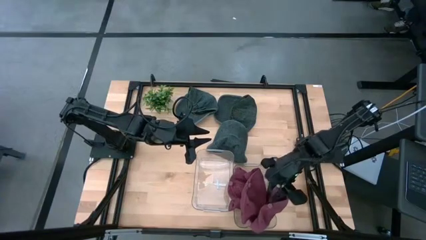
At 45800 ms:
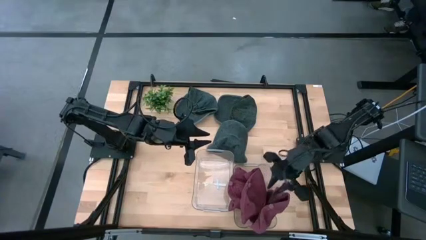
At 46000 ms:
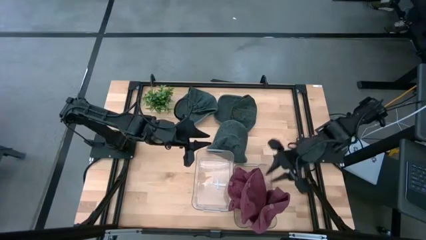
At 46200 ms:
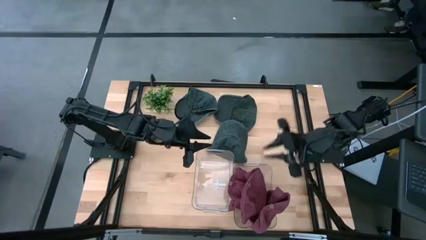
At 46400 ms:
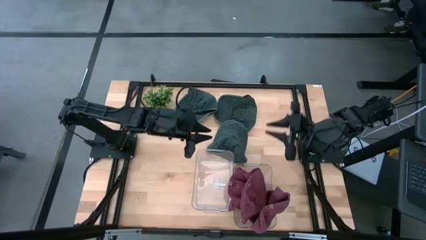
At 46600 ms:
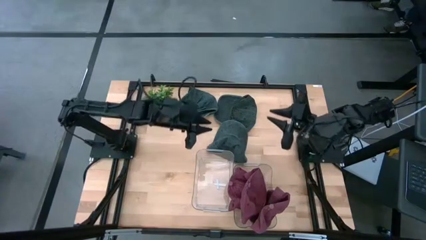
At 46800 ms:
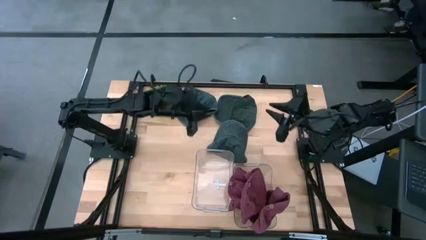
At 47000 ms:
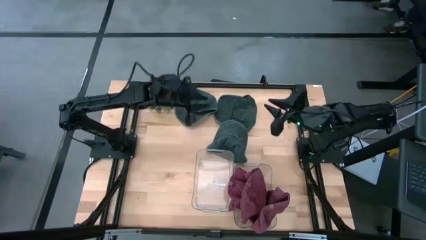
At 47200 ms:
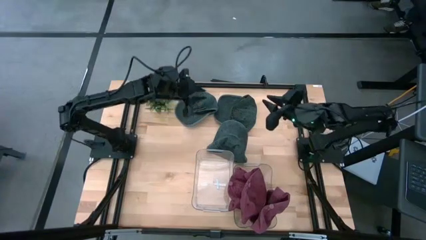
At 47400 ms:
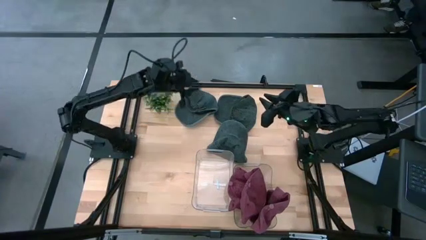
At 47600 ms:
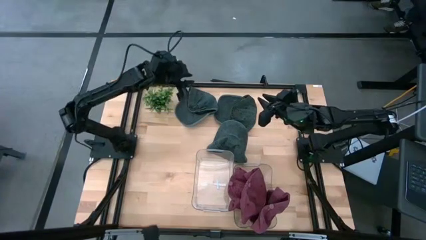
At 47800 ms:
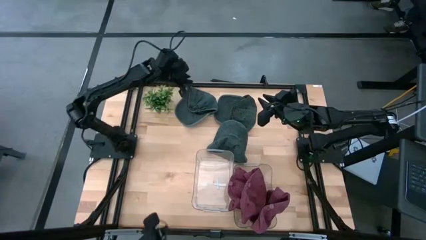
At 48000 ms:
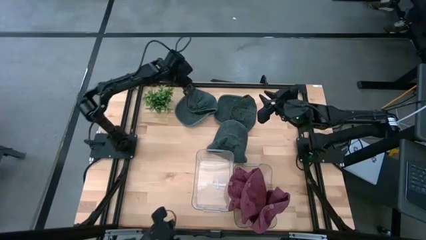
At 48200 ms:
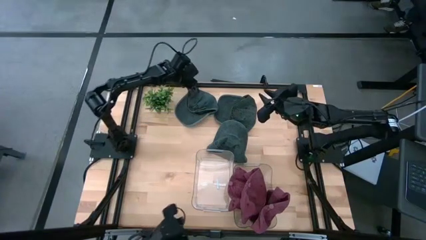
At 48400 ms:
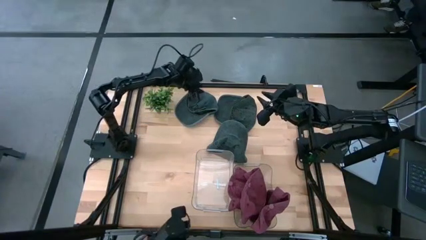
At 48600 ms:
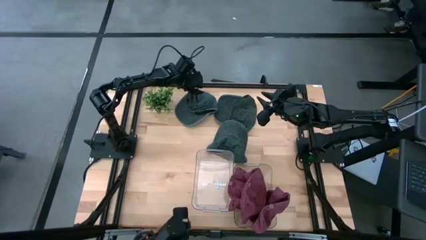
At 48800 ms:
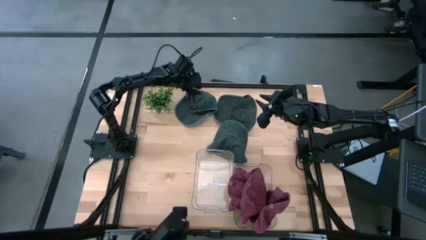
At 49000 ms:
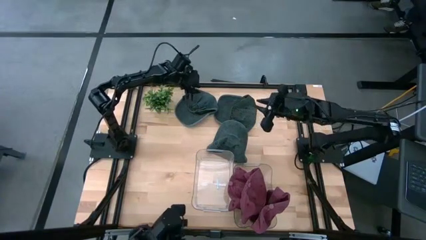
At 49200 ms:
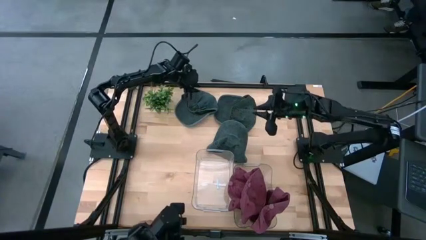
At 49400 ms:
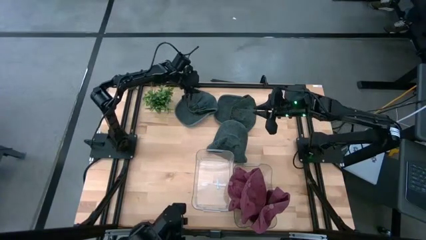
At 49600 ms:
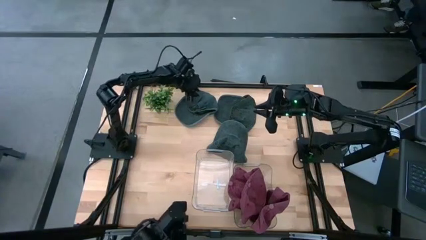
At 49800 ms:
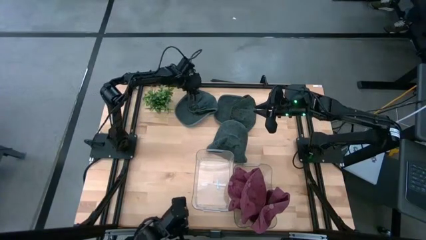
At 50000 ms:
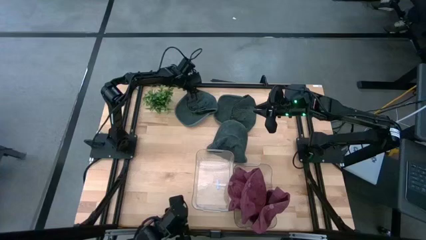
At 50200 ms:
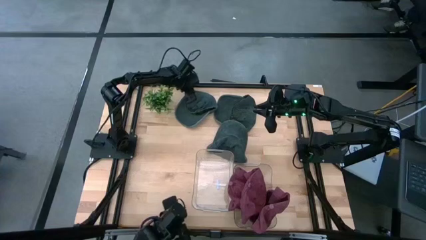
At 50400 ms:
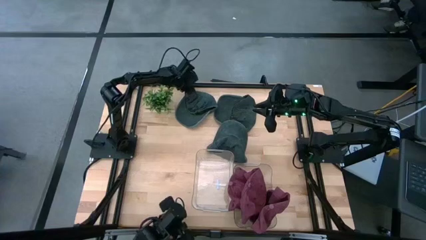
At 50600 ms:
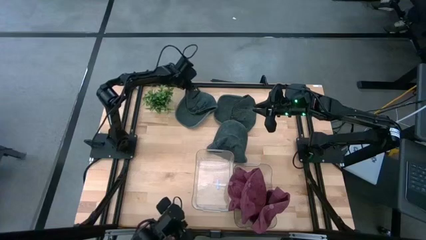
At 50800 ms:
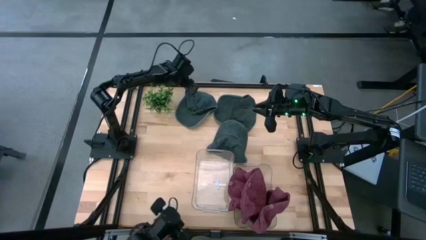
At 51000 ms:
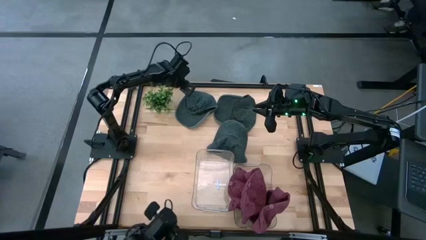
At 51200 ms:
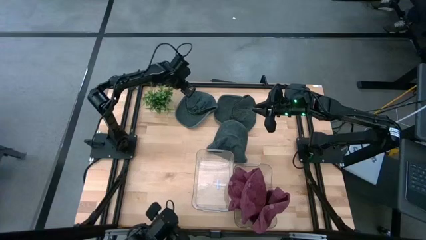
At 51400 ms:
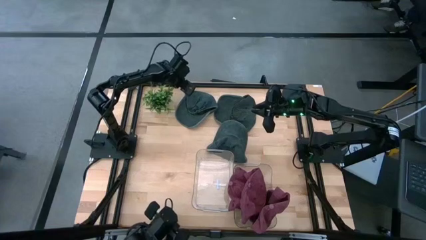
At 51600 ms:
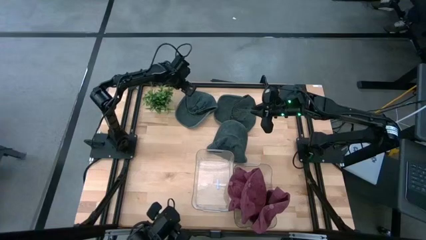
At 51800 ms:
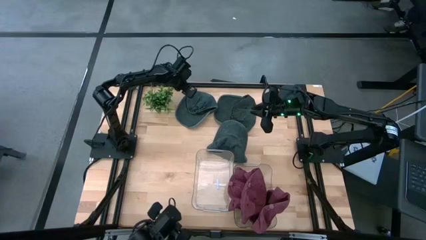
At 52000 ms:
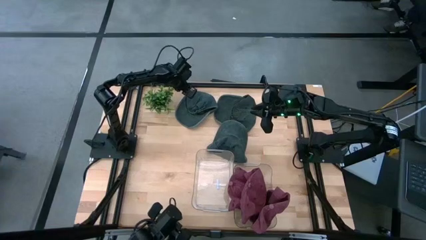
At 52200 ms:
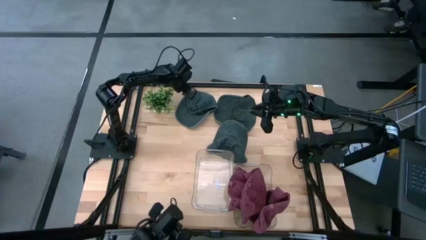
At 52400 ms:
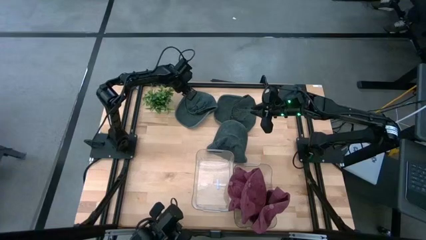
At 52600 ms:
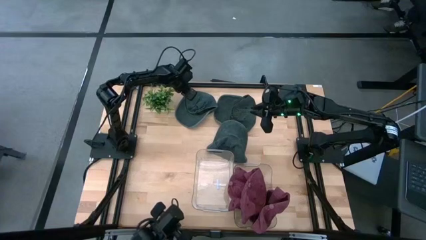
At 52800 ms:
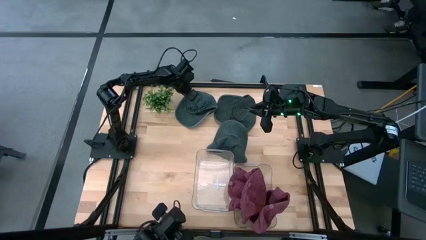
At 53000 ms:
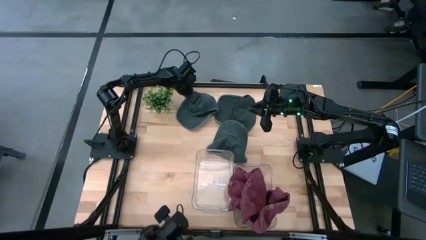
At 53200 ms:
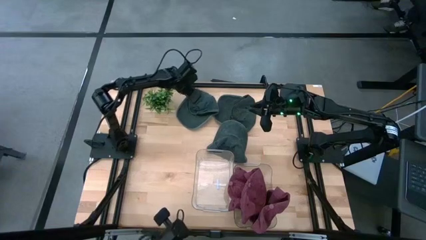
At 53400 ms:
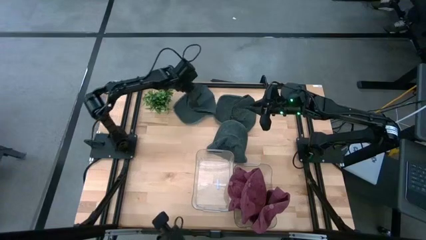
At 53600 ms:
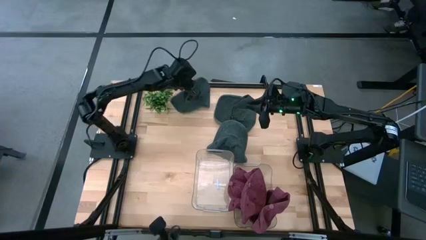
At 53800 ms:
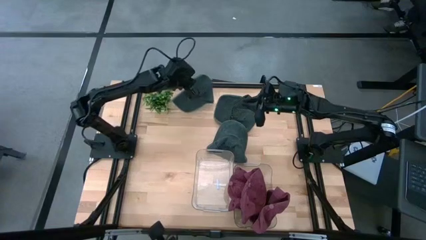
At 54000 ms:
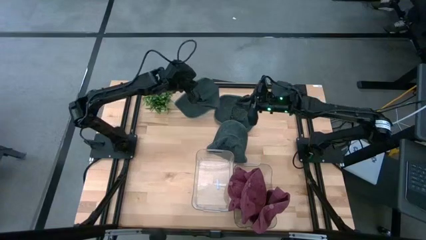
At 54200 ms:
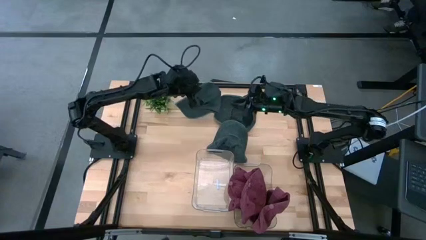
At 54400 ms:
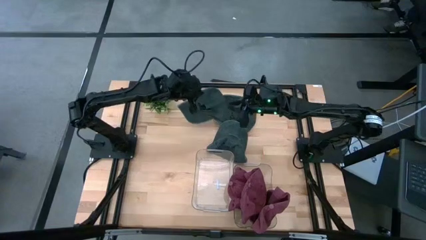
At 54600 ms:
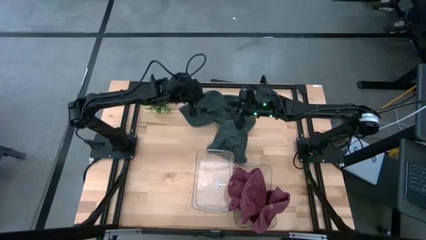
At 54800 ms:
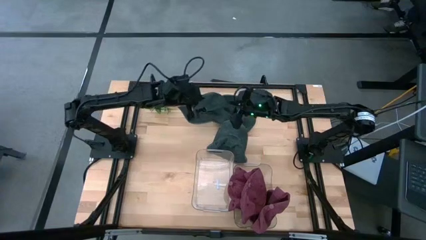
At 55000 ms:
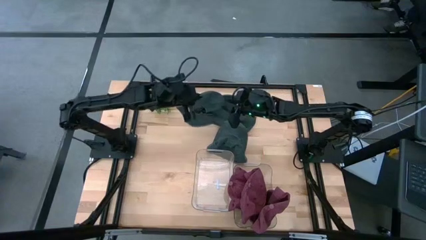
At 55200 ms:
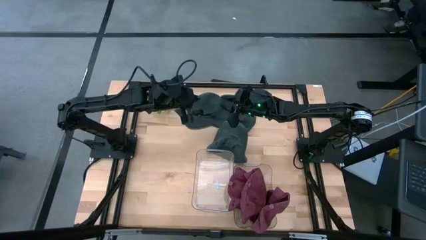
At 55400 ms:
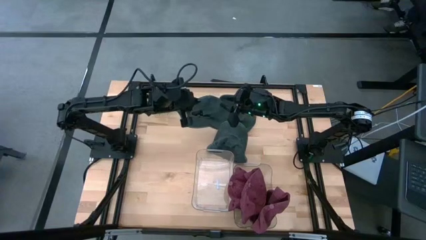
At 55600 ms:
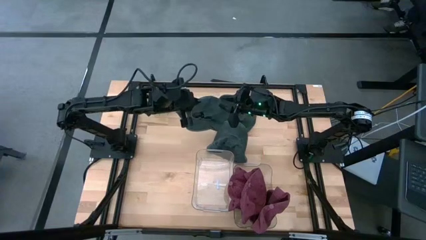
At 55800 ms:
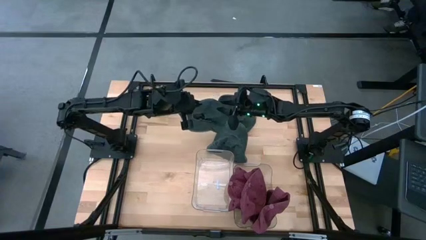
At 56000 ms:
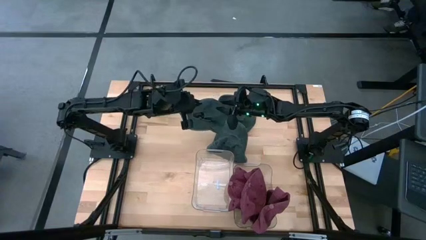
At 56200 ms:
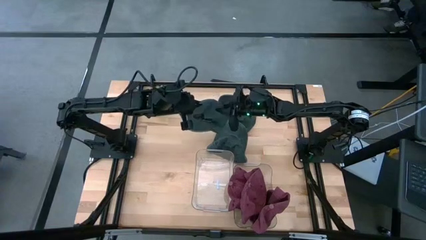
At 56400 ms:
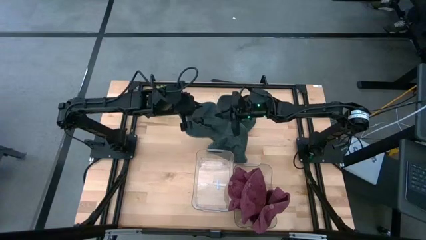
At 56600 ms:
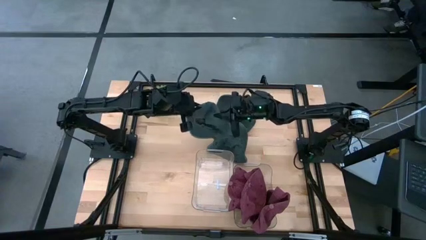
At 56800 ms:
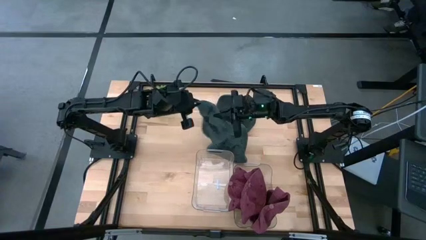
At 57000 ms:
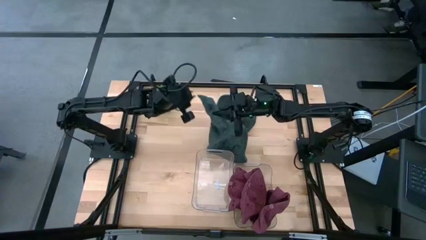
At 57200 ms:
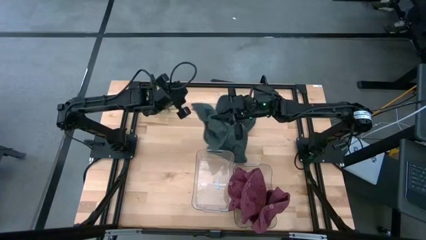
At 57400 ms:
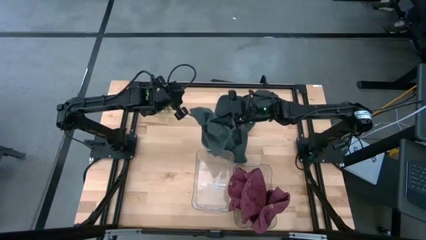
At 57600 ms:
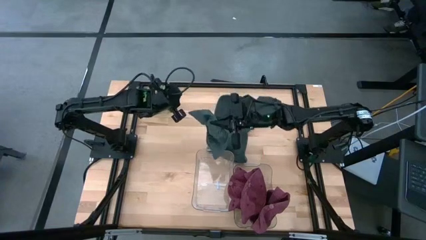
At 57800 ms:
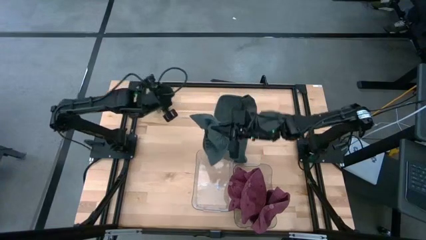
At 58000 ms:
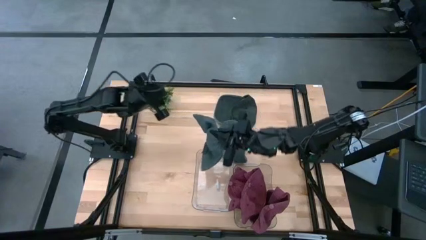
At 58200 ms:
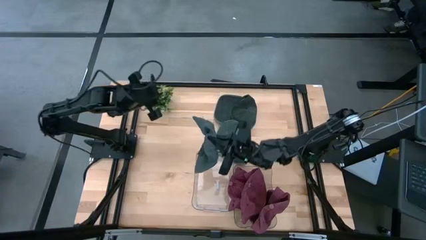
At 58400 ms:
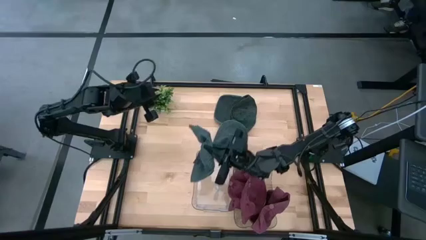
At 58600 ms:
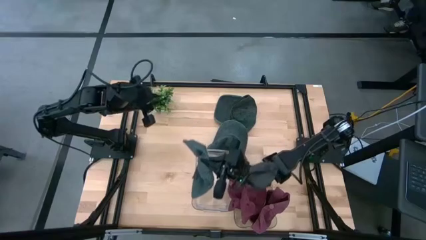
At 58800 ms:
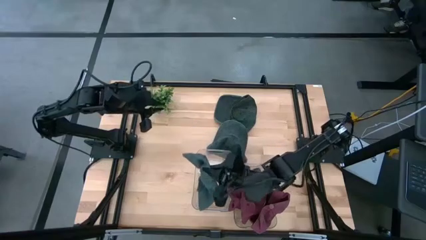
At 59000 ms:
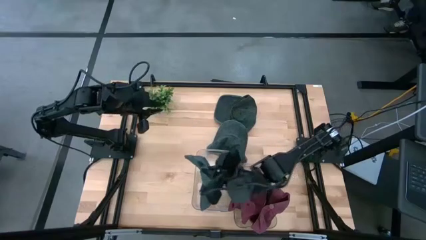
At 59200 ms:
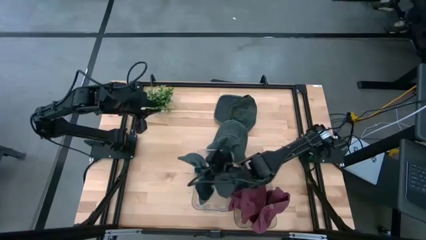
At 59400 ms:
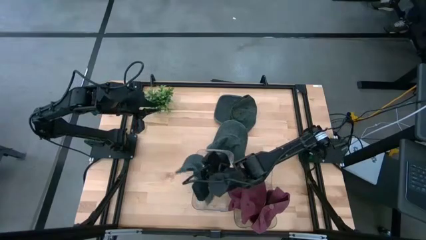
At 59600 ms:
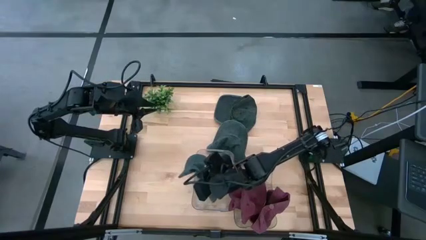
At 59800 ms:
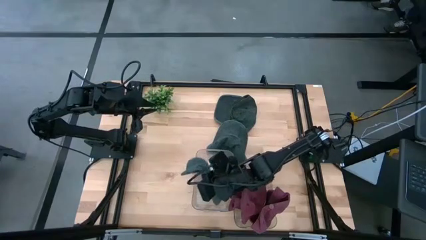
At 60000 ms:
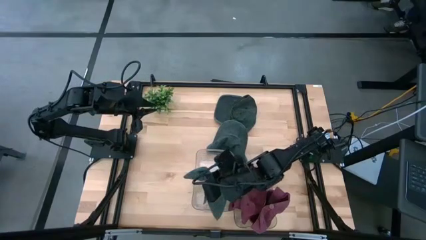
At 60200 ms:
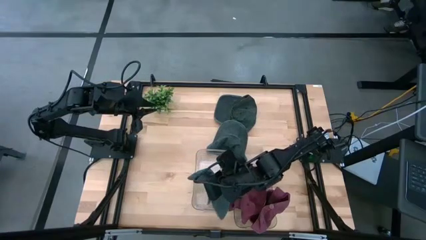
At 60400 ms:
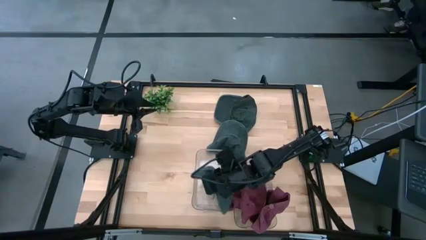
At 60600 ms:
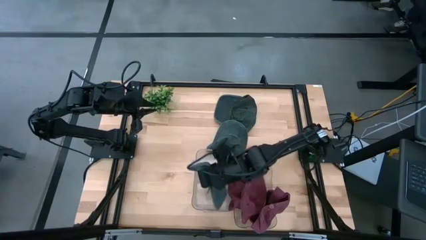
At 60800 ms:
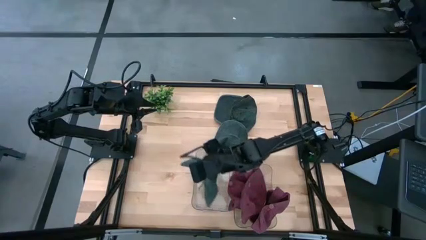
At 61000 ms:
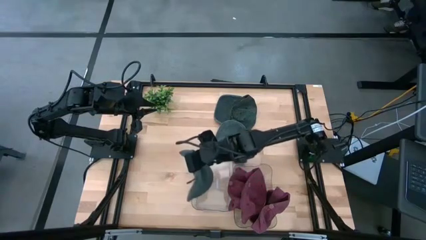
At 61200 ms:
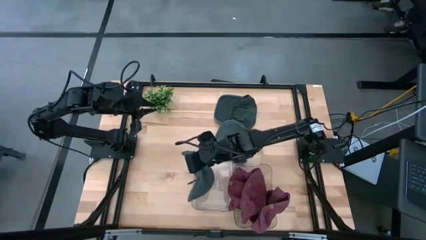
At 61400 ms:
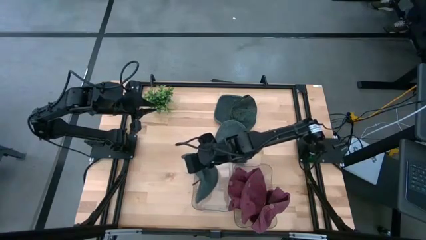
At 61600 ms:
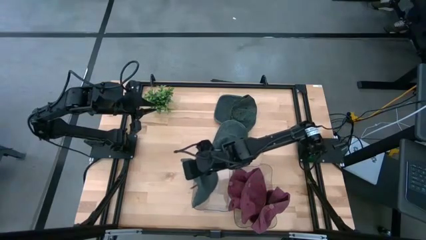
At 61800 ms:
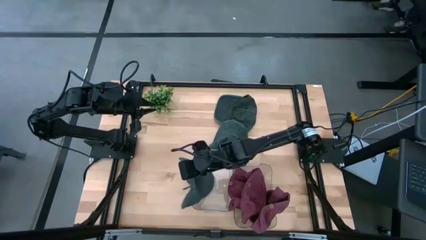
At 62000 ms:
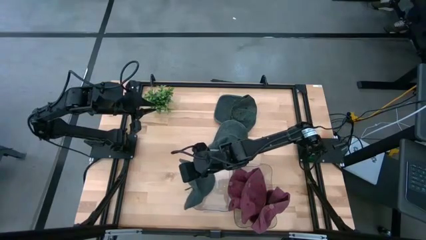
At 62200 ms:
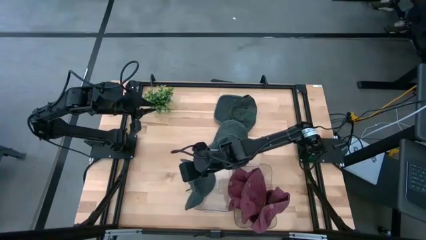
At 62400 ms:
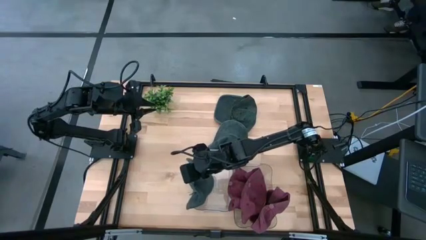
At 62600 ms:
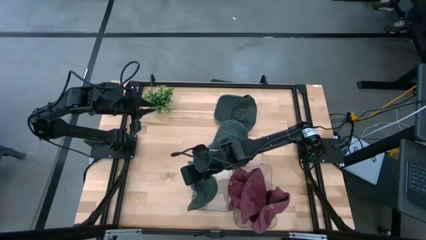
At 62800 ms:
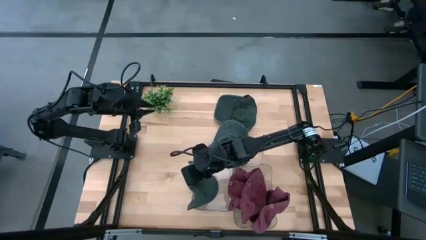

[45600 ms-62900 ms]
Task: Pick & Place hat
Put the top left gray cap into the left transparent bin
